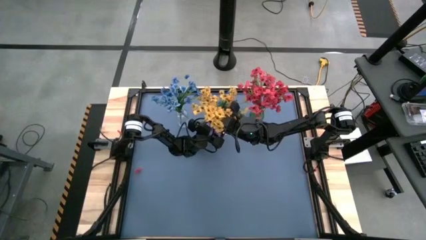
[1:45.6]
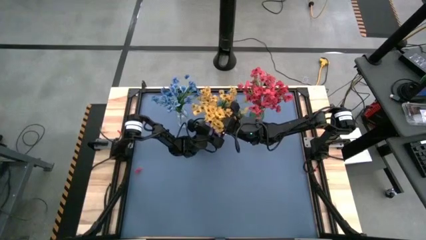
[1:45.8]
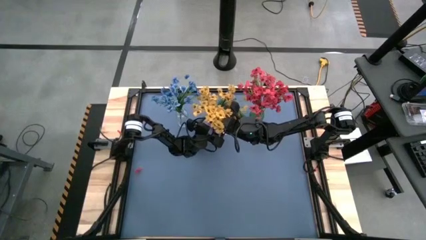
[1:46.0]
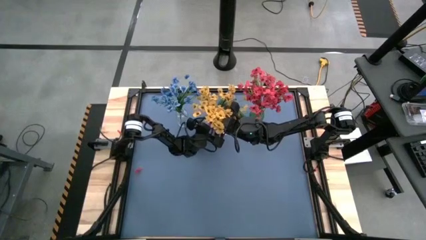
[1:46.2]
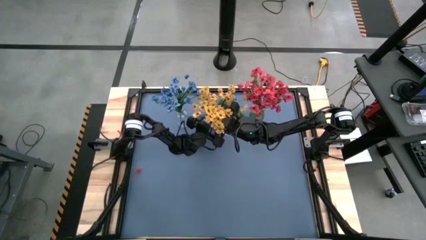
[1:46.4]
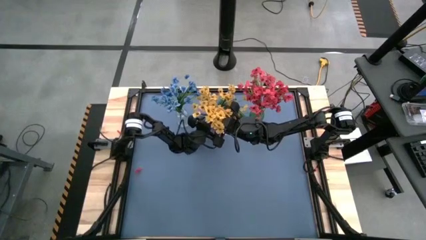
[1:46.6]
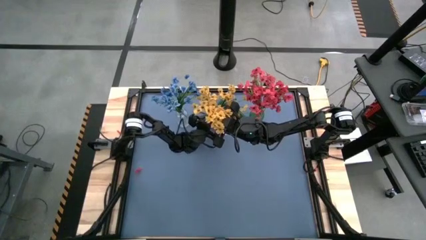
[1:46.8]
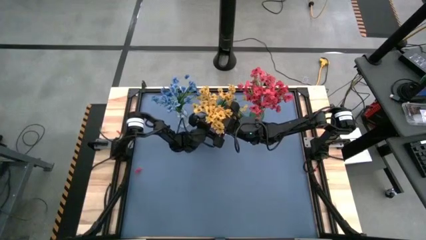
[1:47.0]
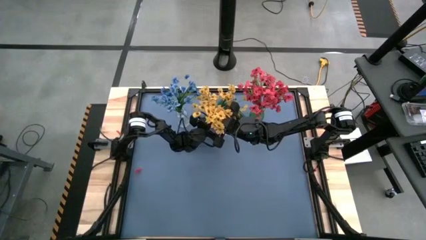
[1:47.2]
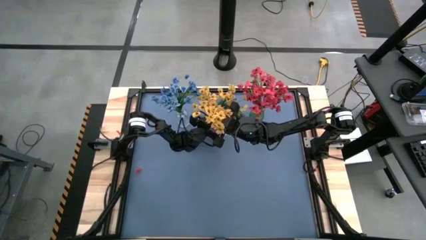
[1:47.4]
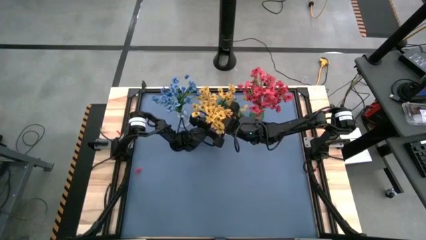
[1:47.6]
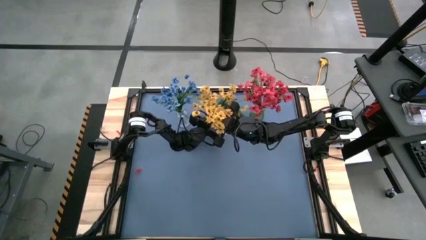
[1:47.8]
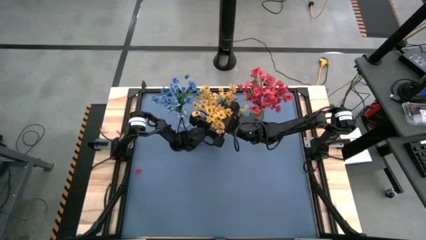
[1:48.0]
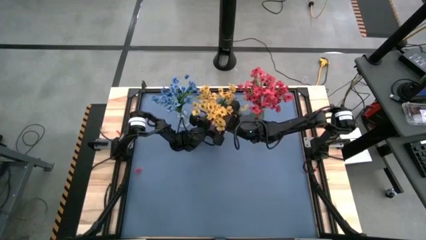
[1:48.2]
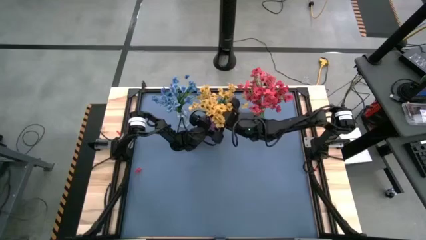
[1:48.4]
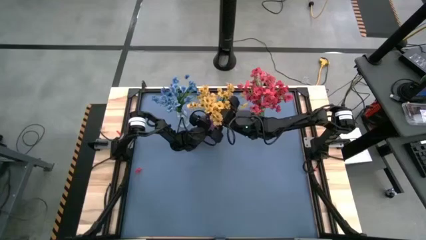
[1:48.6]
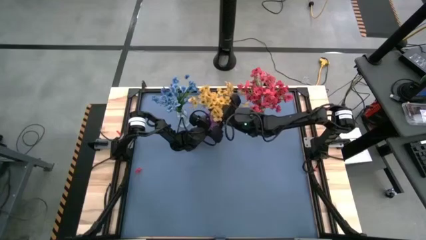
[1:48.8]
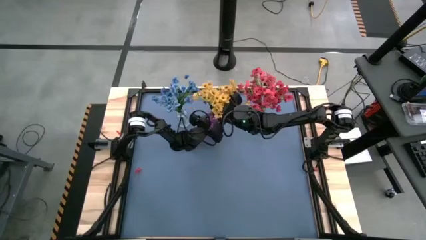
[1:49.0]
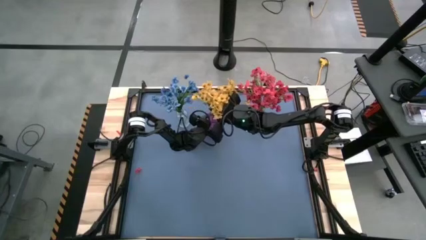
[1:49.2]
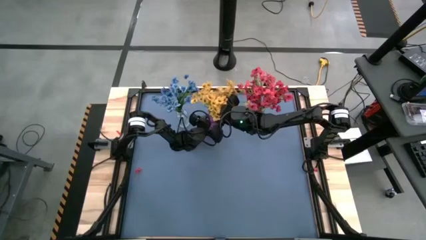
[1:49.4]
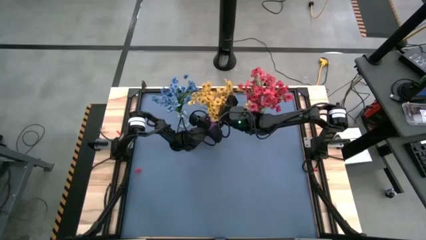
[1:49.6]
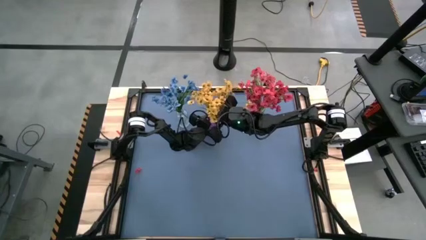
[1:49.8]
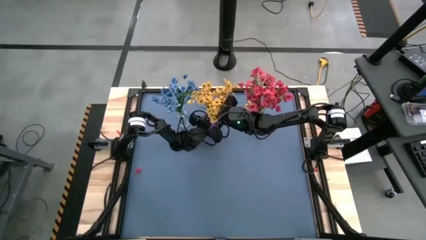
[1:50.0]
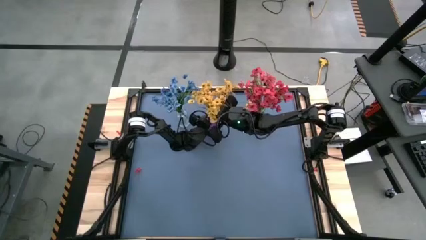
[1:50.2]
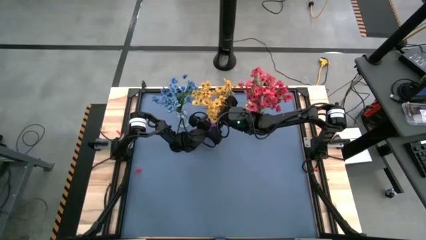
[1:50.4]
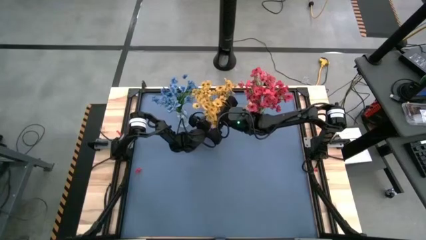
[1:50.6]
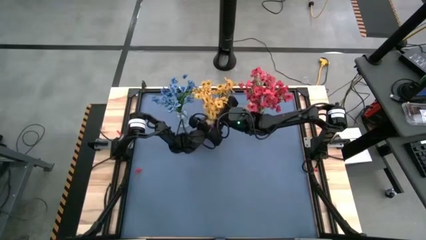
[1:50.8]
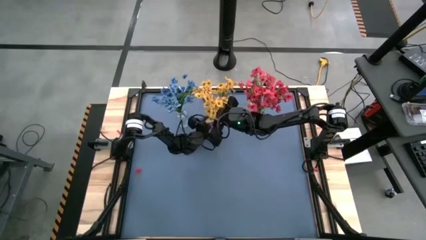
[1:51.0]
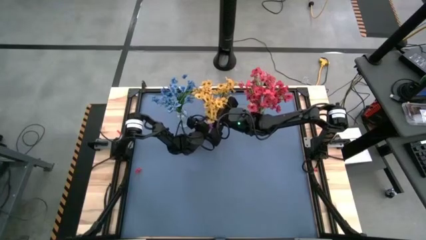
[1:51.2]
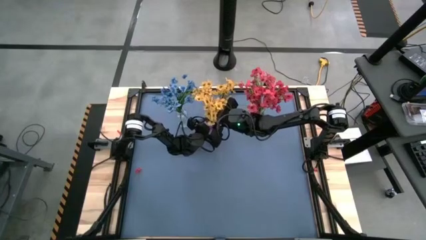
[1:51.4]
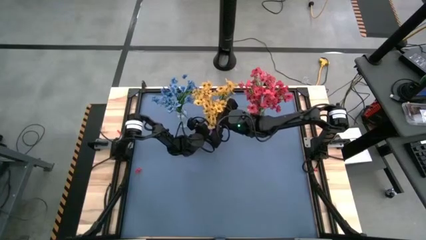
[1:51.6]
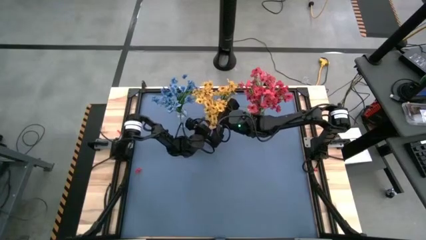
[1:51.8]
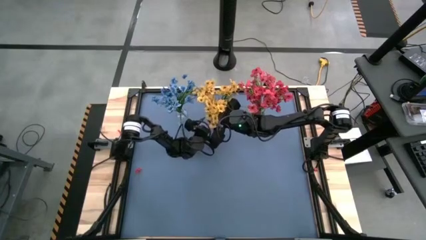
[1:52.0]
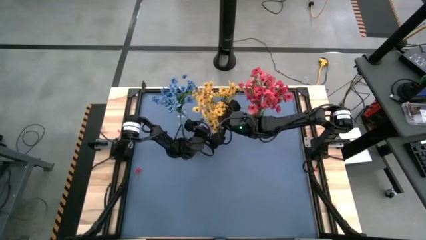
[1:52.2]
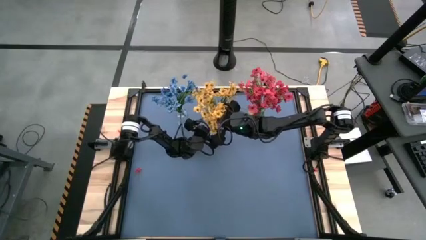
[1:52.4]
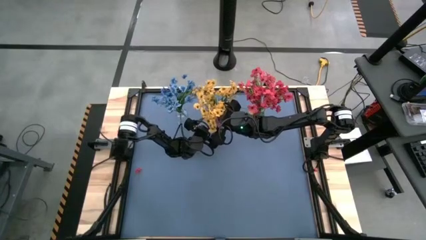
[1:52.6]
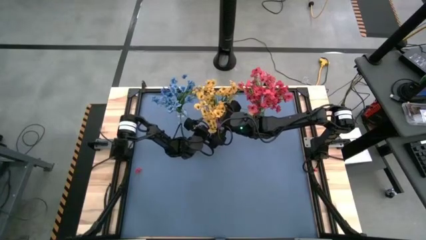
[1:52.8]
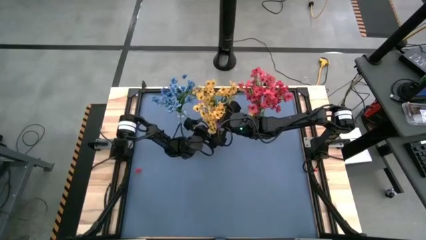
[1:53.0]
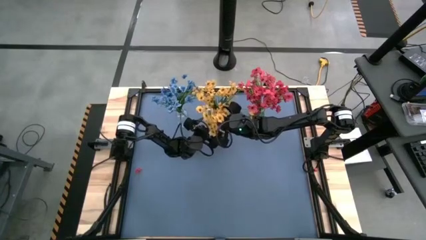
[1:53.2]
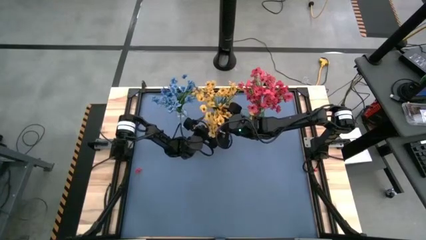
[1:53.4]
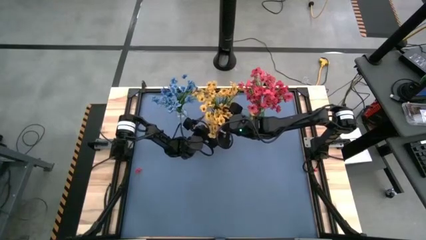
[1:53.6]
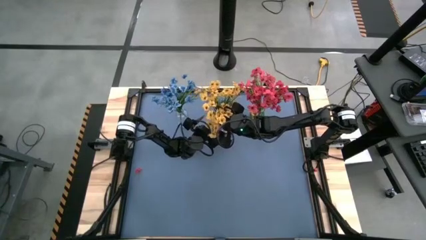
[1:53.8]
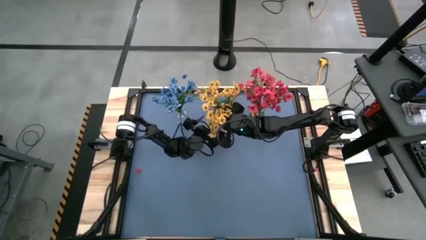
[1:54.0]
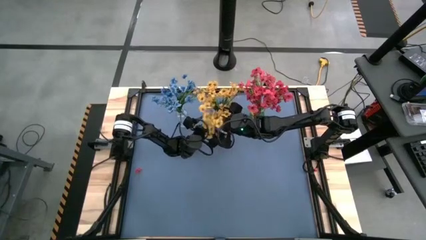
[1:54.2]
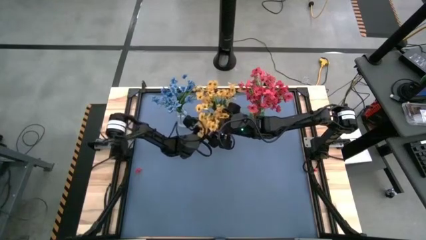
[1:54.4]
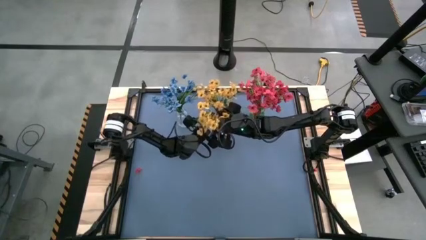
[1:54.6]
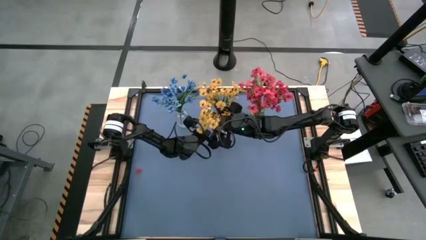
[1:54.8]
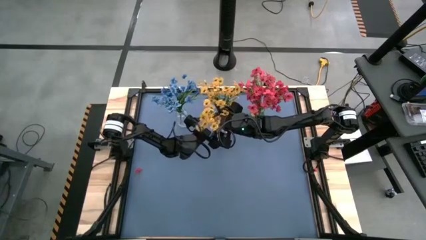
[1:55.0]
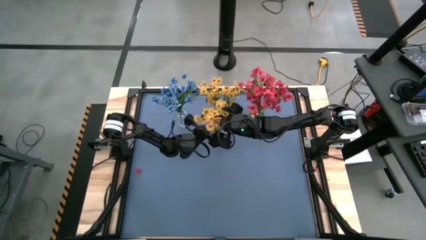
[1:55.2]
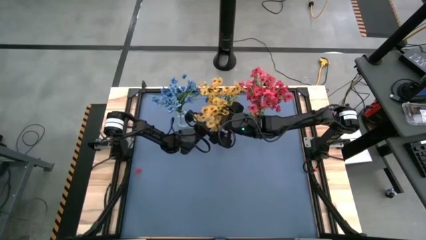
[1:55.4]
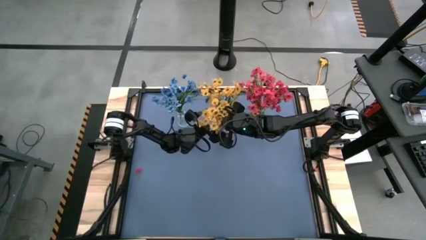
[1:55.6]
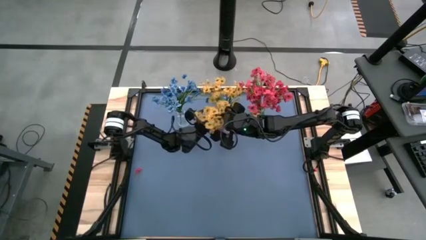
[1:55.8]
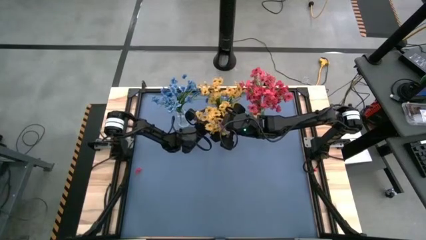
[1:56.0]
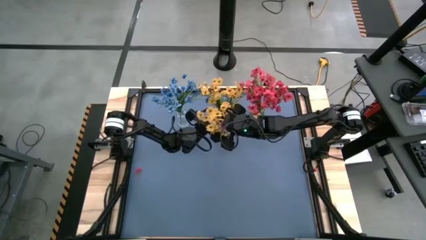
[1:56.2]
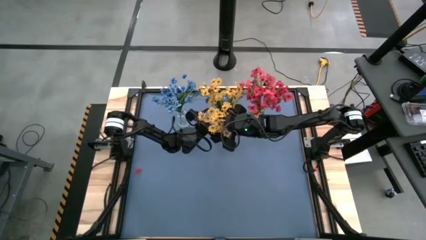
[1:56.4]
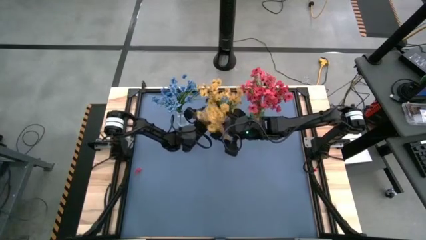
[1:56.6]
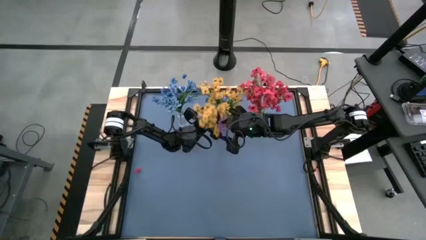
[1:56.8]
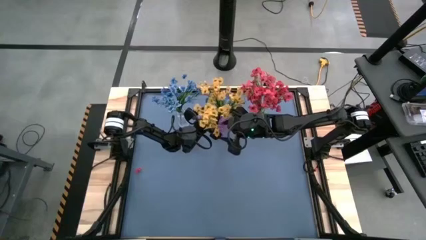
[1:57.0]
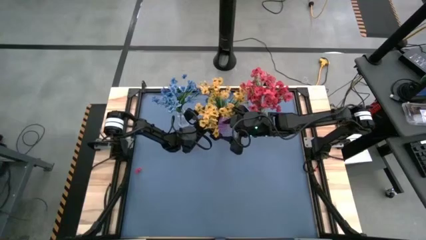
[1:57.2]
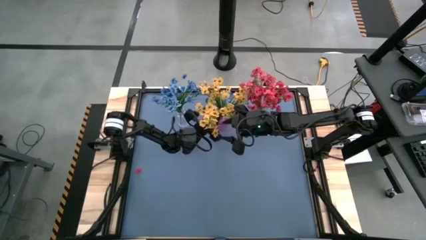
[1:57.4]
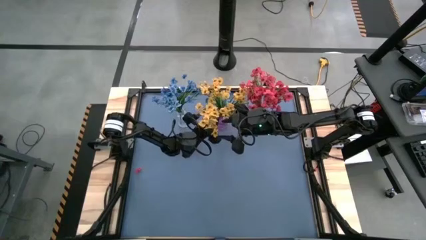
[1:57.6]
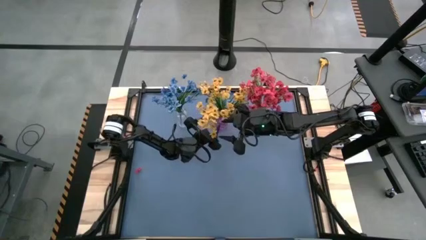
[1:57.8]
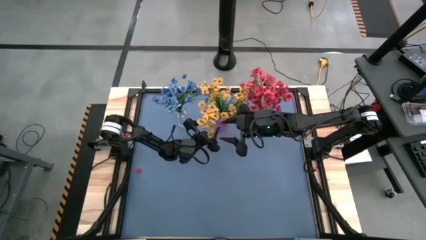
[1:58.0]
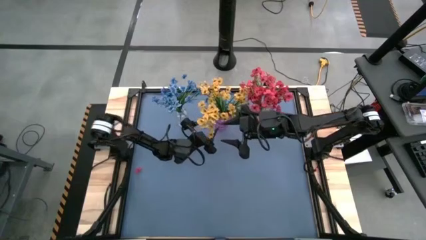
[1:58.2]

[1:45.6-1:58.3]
Task: Sort flowers into vase by color
Put the yellow flowers into the violet vase
